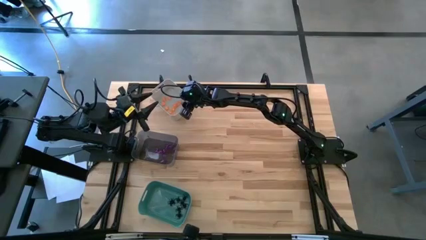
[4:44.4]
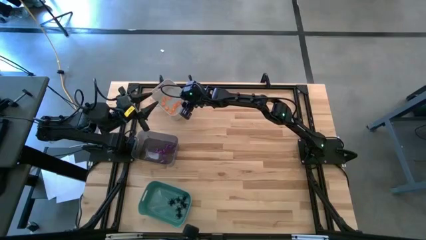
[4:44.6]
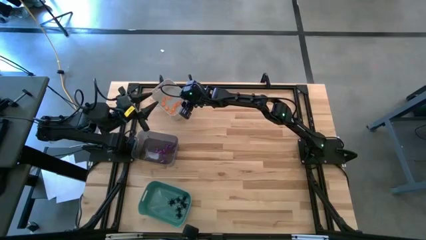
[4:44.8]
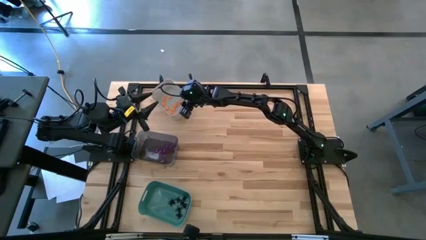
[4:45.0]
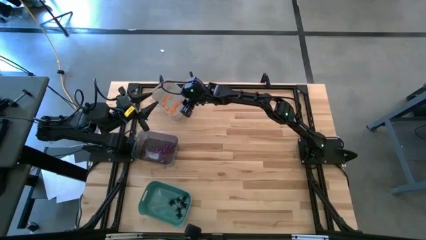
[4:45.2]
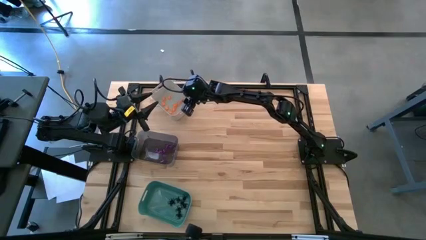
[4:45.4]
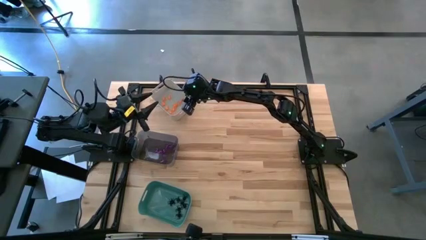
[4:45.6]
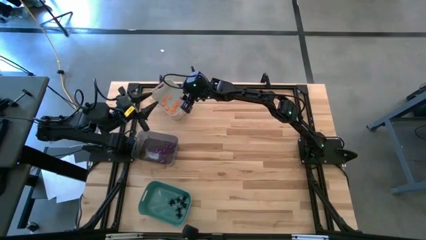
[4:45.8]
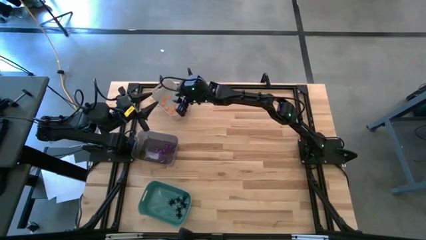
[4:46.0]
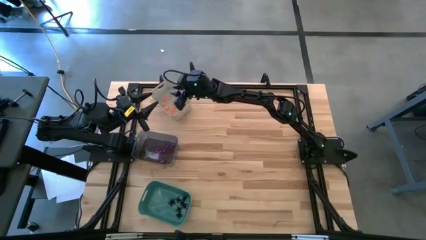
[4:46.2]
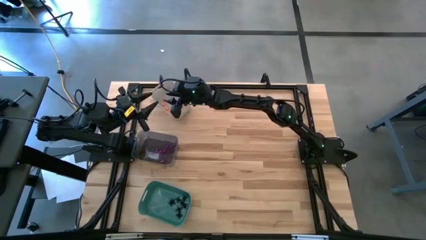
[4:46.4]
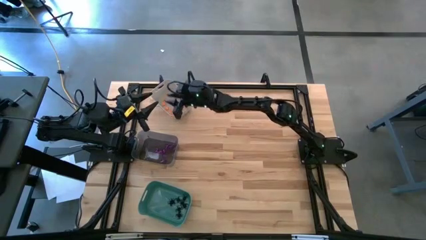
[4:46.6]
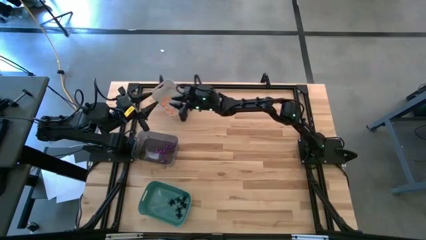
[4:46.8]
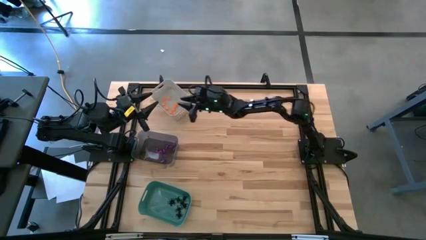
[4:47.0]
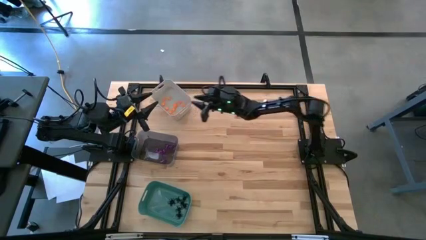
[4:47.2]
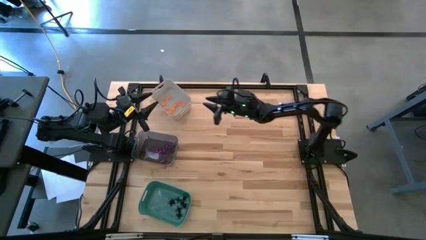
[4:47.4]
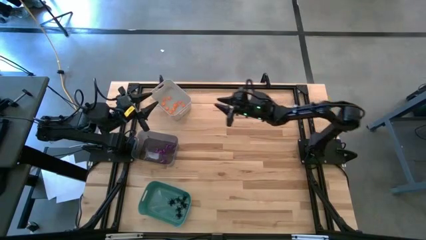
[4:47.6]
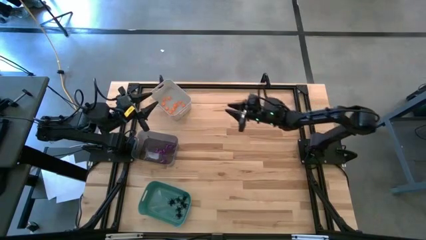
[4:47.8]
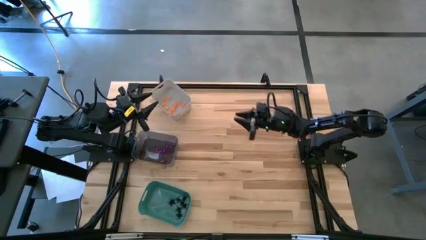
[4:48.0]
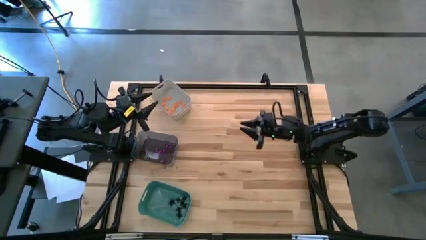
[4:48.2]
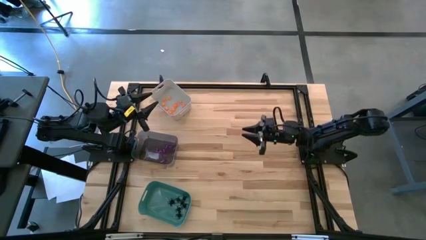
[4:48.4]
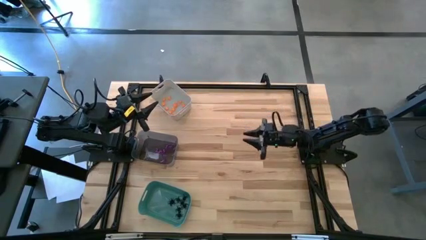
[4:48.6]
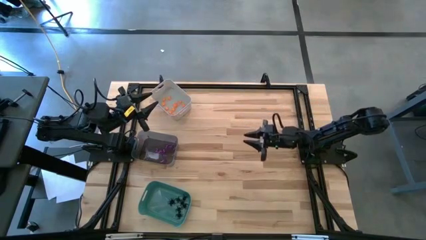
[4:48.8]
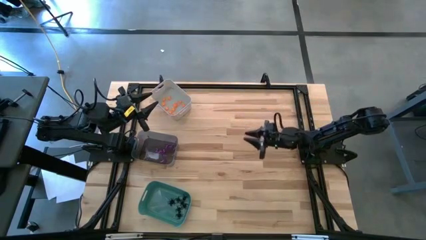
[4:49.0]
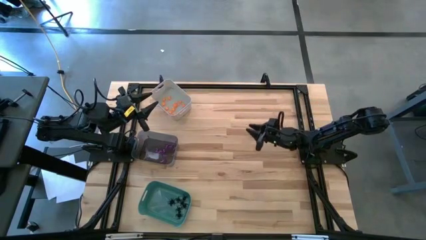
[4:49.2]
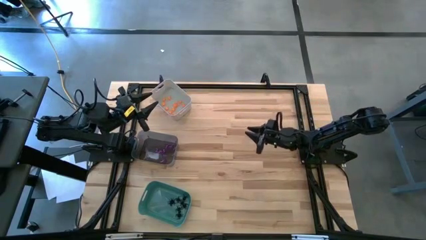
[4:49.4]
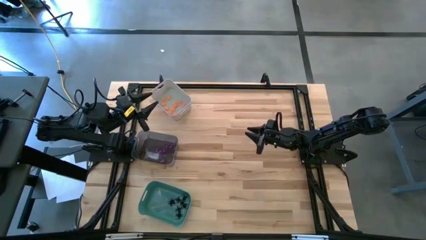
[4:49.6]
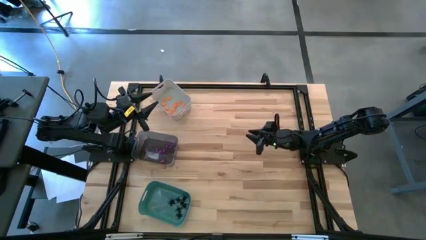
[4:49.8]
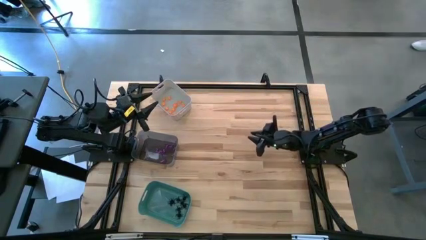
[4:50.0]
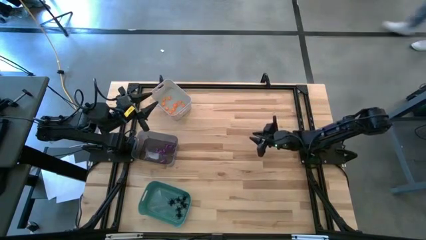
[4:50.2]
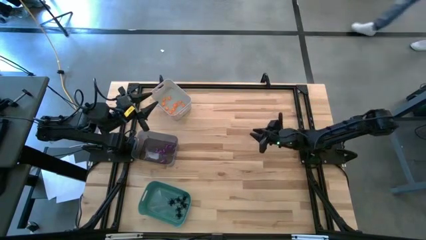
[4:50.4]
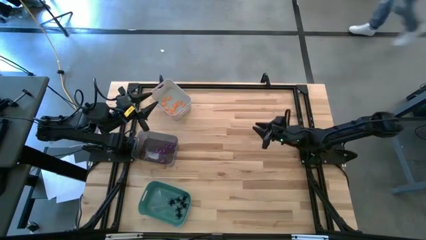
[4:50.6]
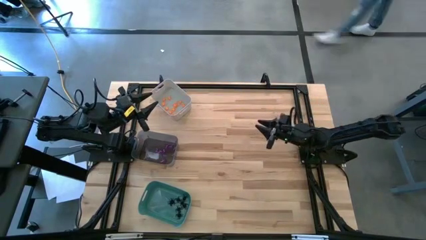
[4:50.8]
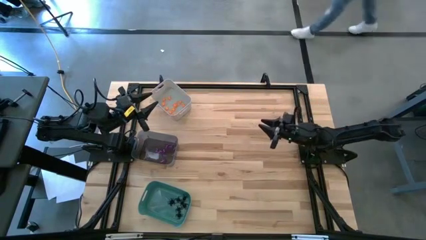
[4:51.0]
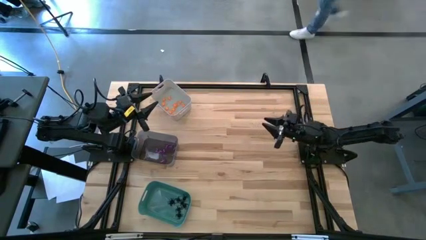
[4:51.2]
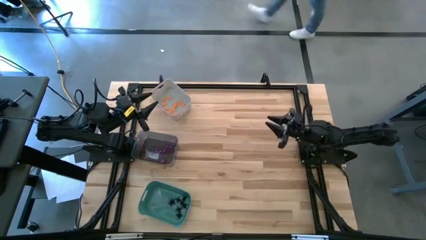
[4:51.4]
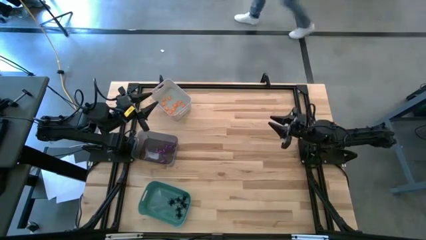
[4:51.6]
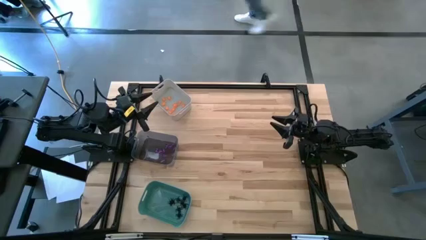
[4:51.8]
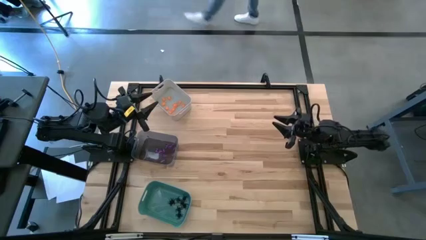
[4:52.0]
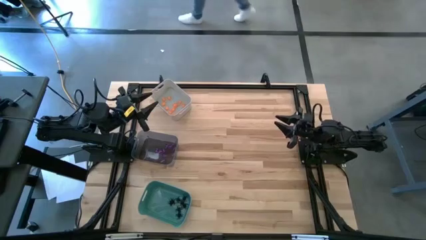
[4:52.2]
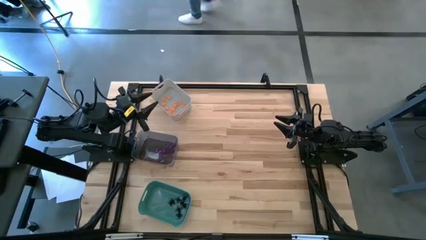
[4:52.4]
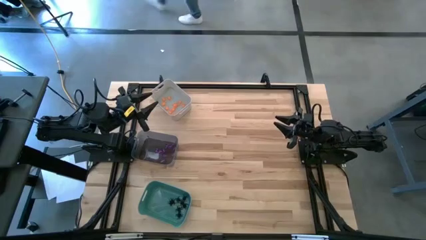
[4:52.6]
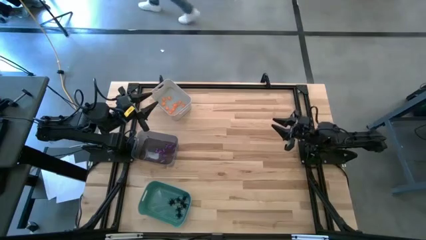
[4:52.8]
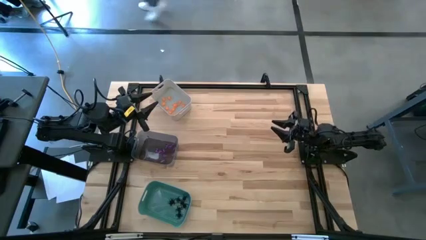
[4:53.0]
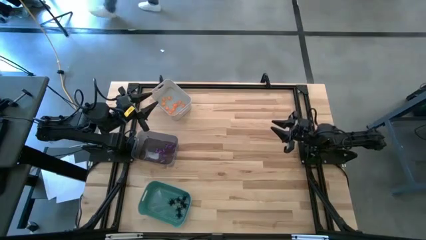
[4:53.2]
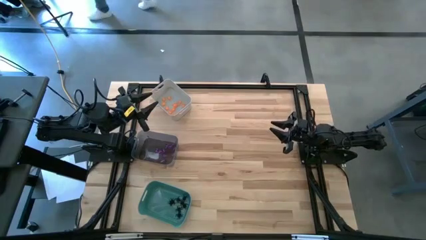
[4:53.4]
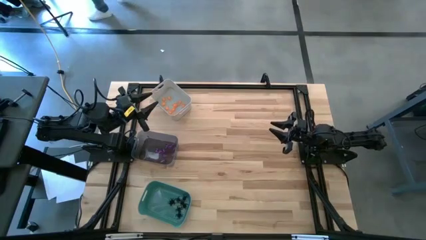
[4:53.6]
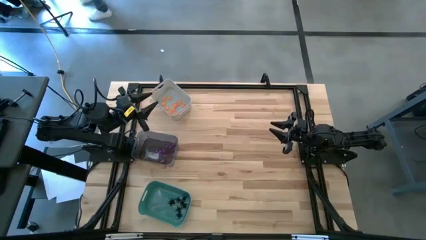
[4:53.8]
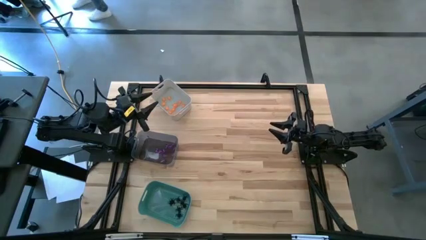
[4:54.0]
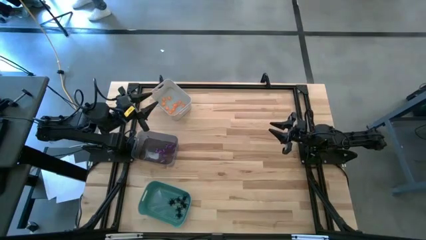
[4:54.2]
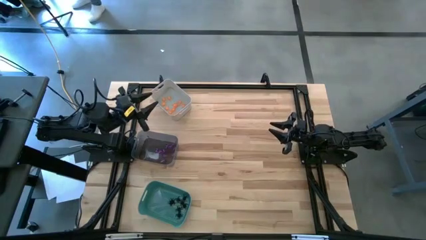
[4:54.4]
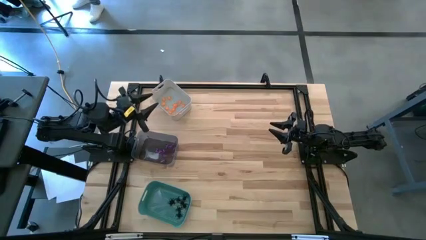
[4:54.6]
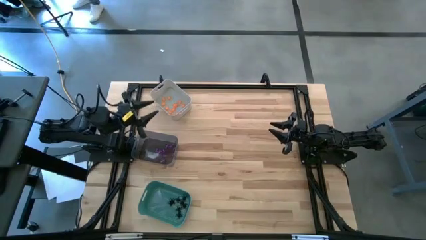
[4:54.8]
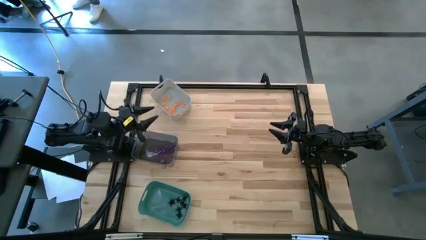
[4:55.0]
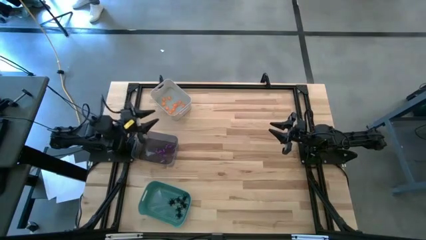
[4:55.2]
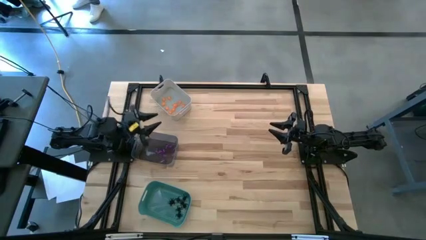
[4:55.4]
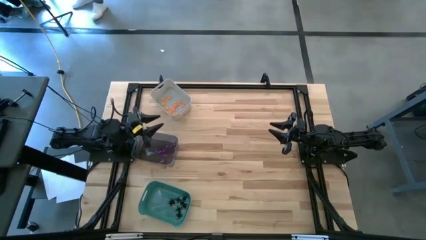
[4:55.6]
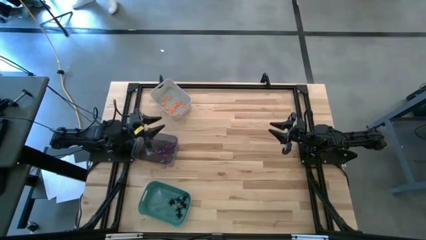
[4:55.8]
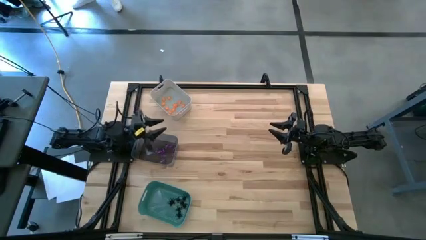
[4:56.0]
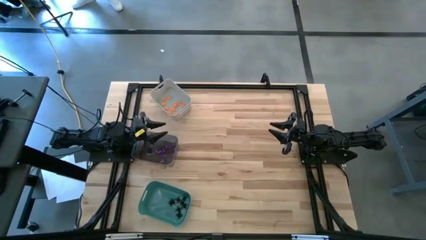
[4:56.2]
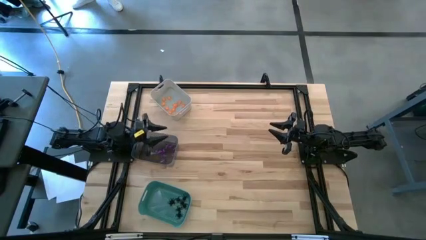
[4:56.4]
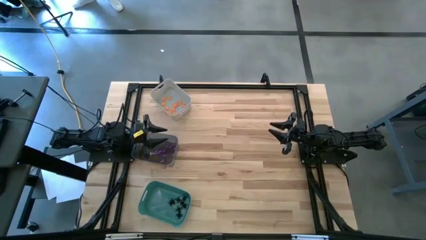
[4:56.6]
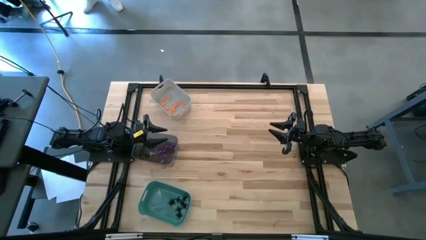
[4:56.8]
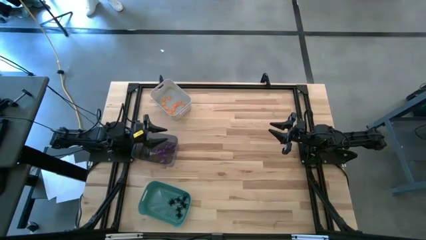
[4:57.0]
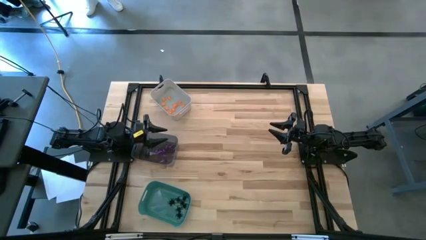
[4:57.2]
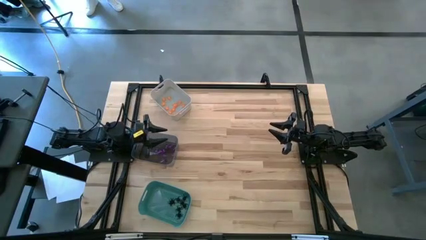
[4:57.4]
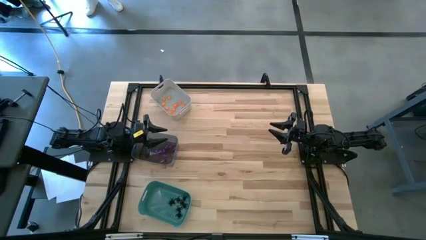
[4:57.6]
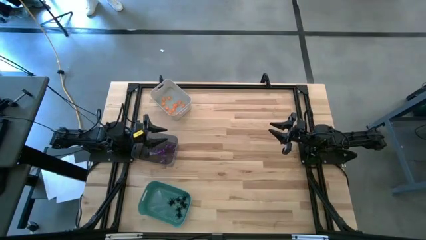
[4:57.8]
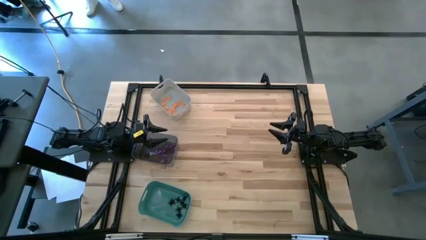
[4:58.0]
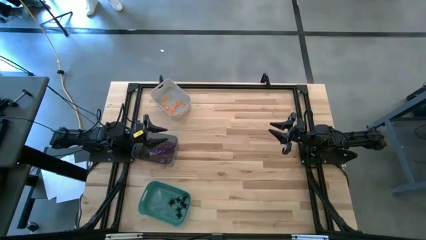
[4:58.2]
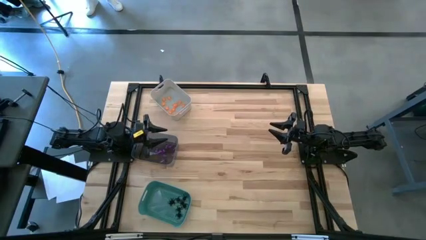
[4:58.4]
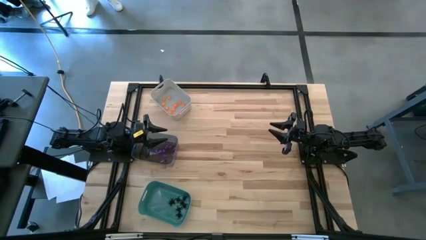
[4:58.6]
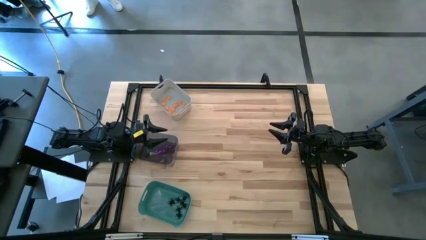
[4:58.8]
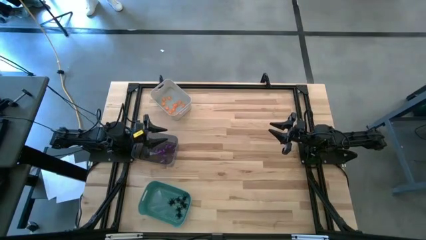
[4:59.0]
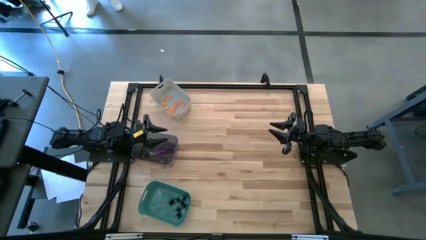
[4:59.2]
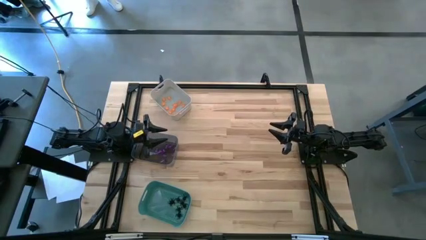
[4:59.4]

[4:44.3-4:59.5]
Task: Sort Halloween decoration
Return to Home Position
